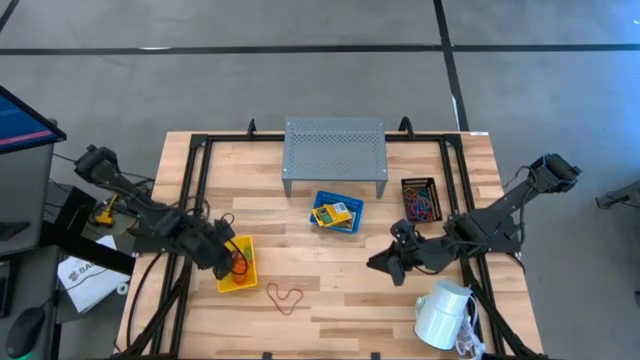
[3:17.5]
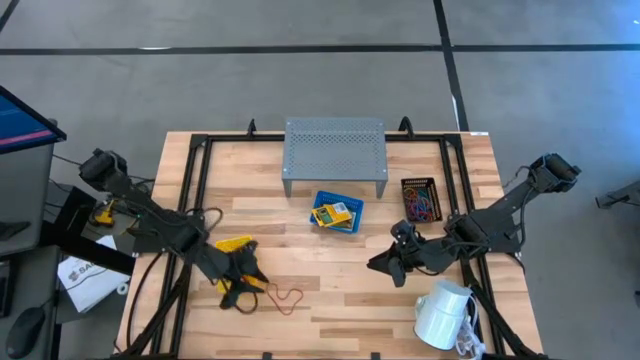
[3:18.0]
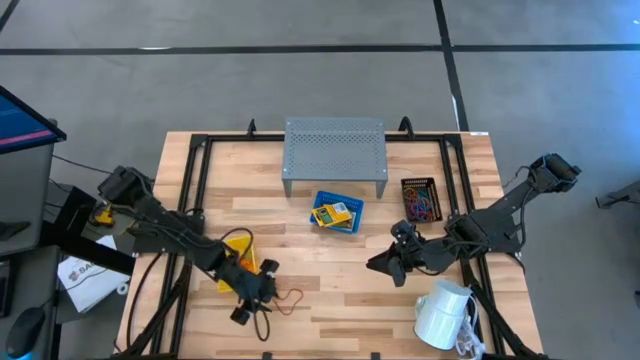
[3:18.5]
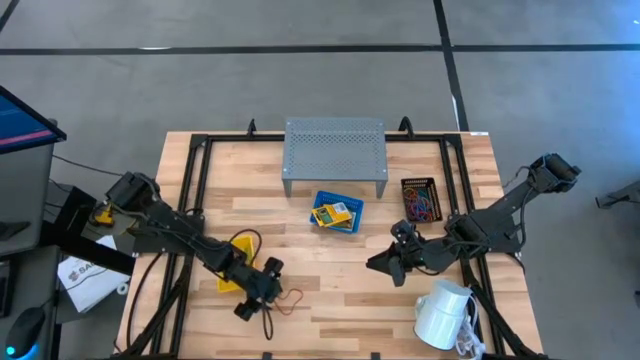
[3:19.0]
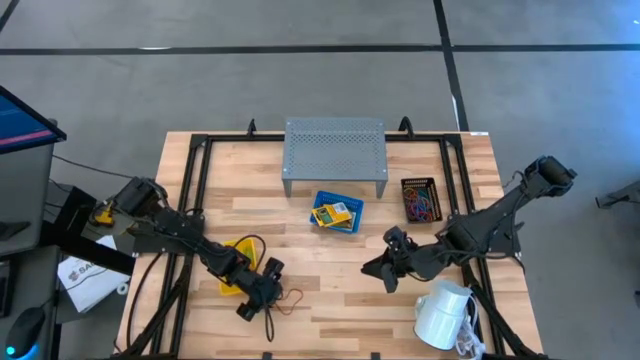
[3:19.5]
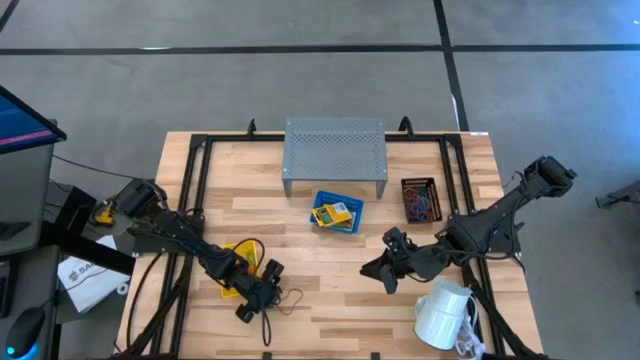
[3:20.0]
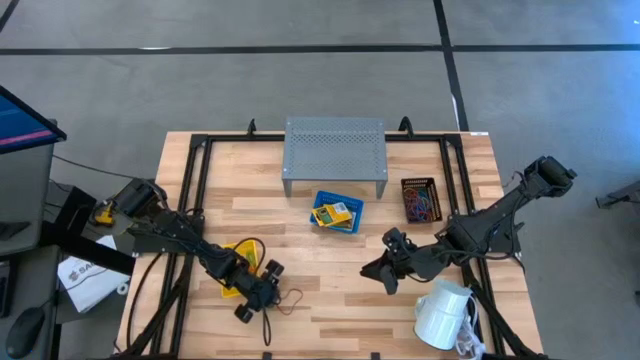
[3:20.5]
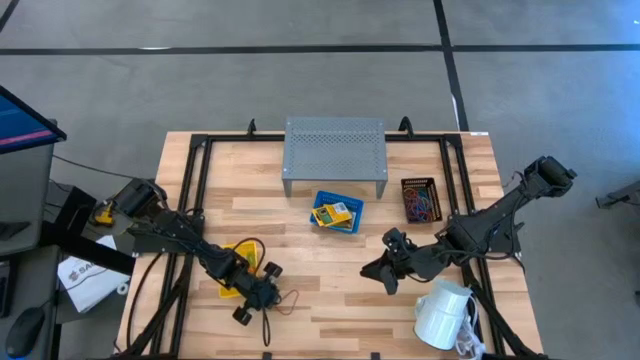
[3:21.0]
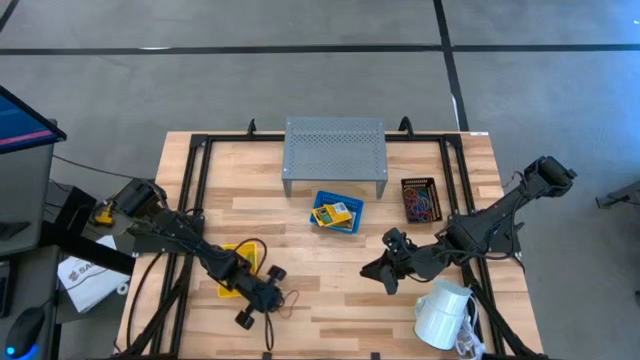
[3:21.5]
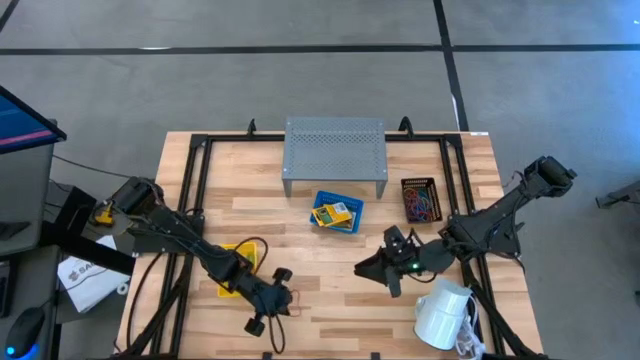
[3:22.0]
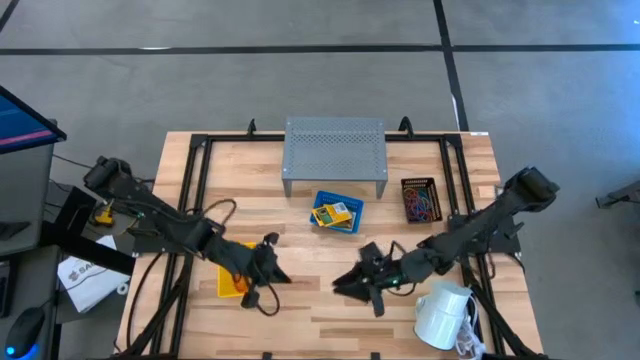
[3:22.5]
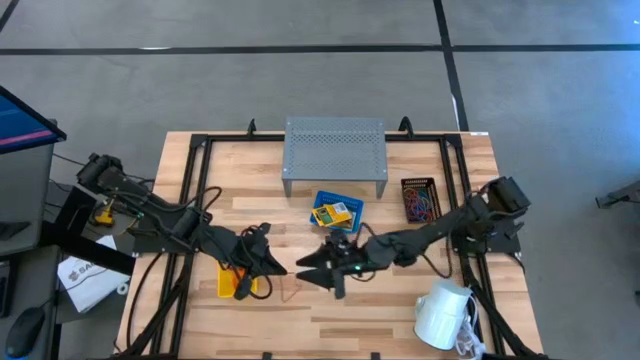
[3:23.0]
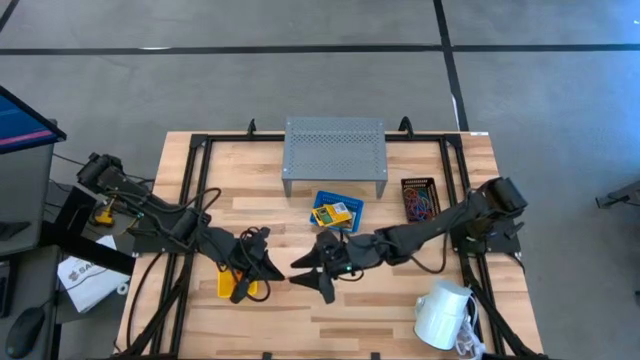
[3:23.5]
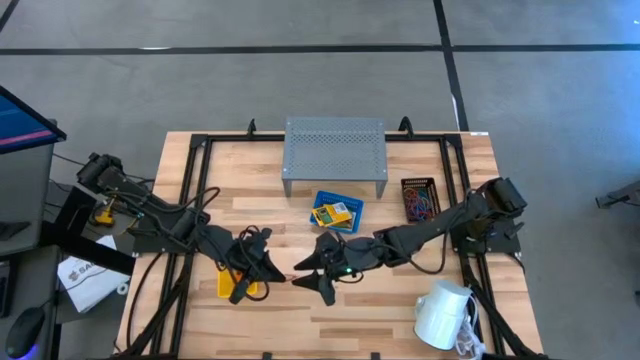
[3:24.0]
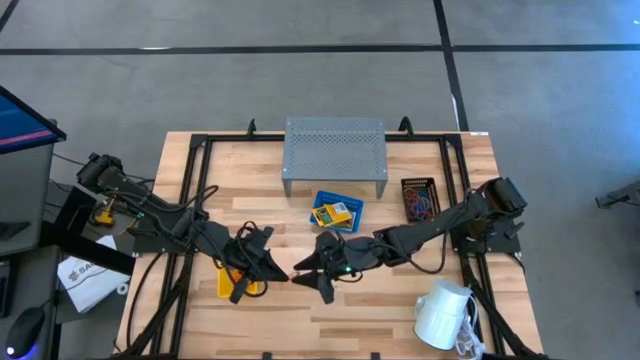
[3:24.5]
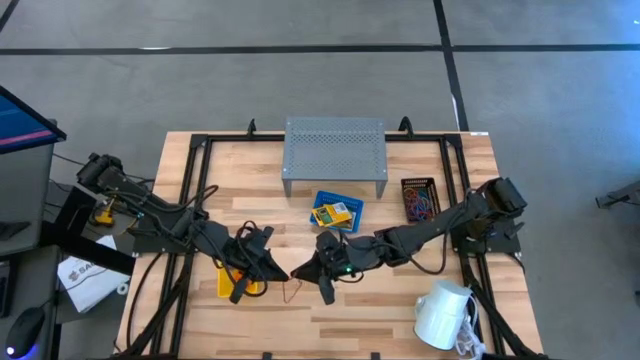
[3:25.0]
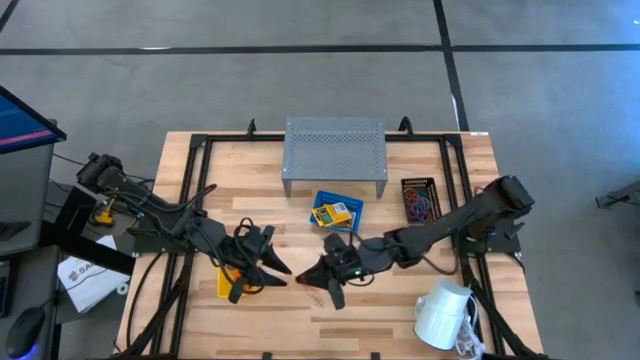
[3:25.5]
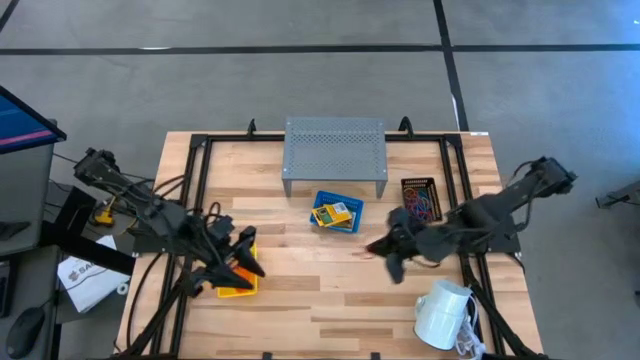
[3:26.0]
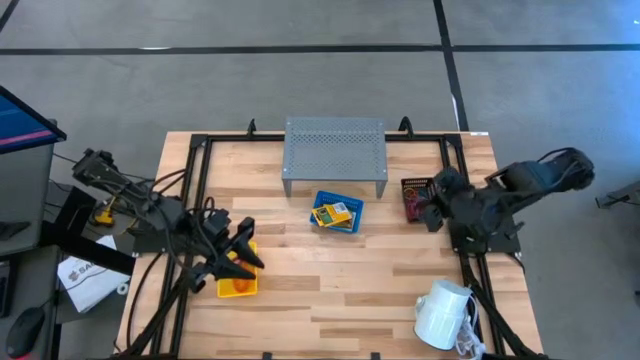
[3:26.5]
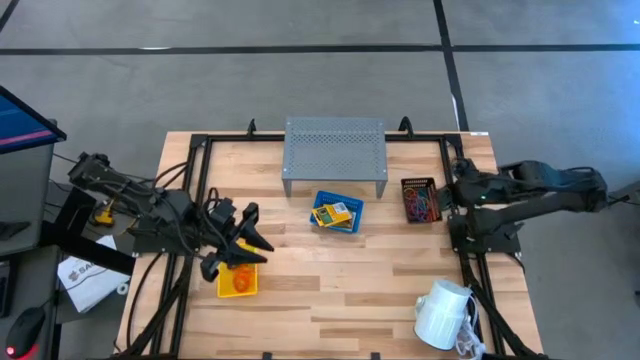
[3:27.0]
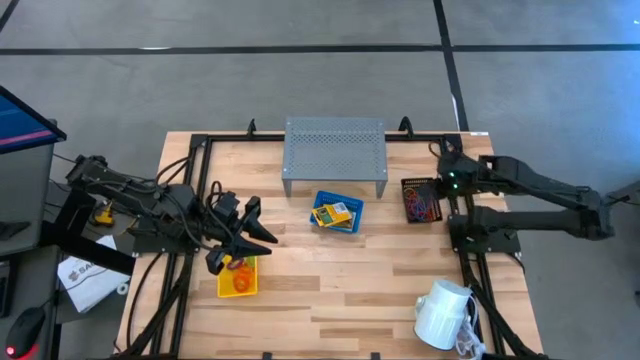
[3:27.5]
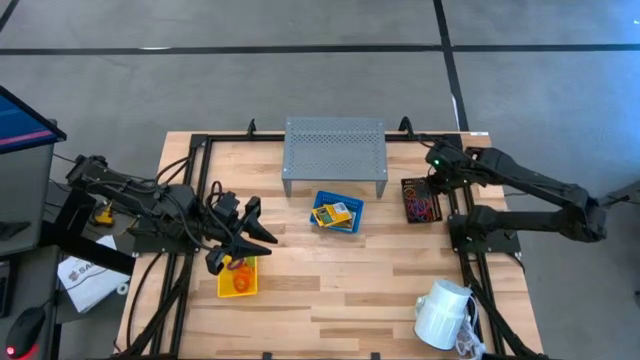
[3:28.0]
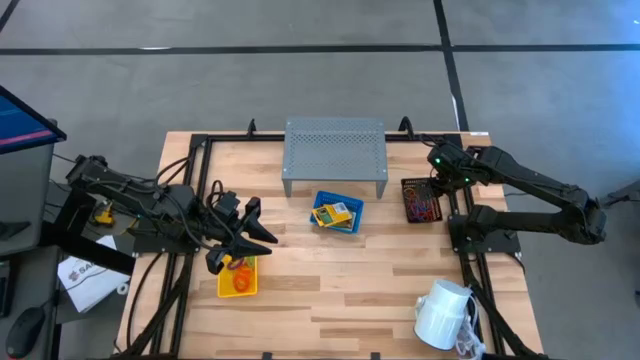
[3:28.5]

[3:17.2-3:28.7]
Task: Pick & Place Office Desk Supplies
Put the red rubber band into the black bin

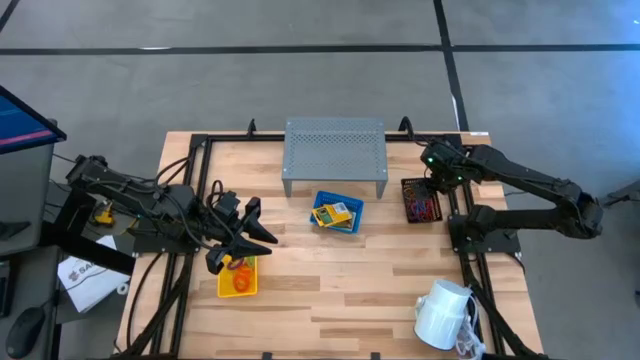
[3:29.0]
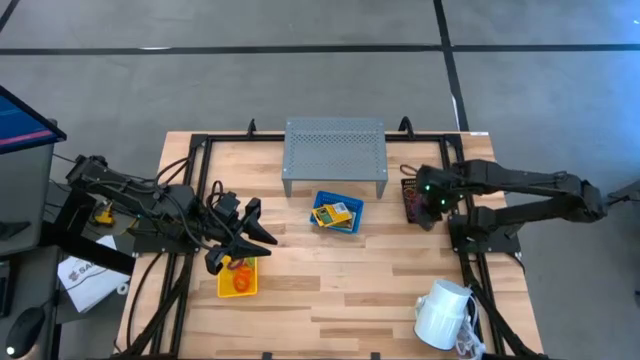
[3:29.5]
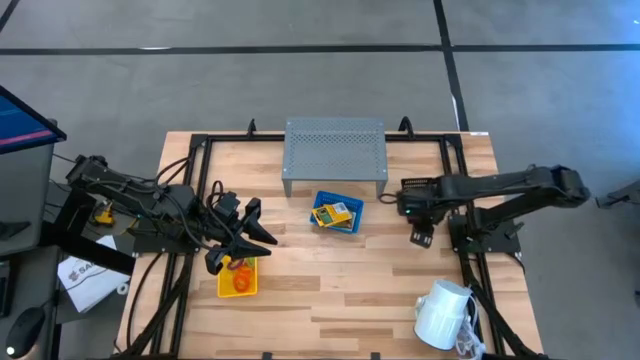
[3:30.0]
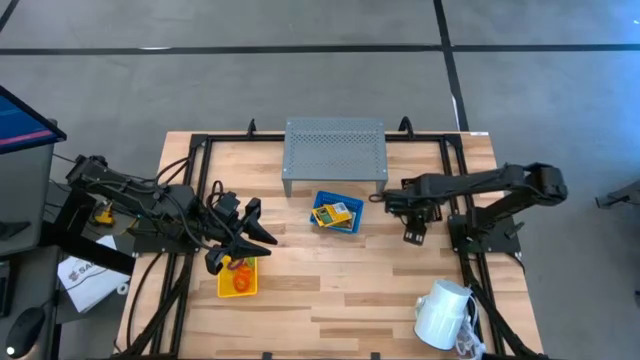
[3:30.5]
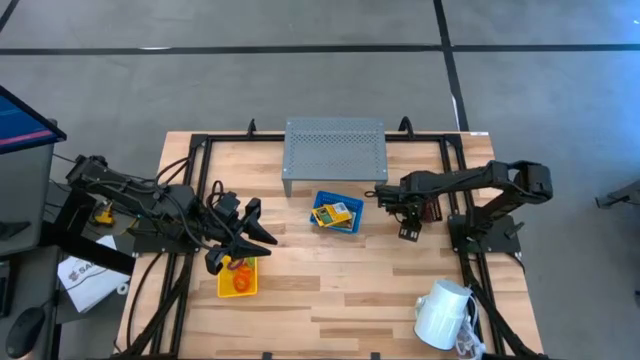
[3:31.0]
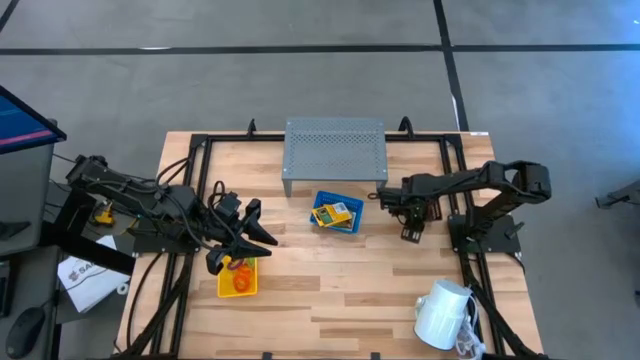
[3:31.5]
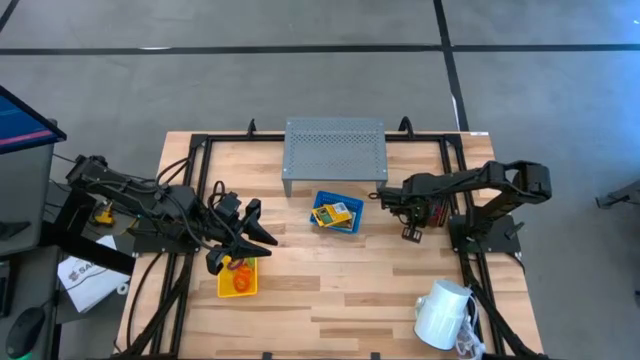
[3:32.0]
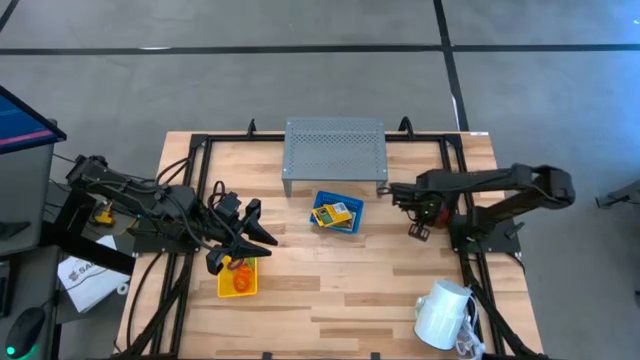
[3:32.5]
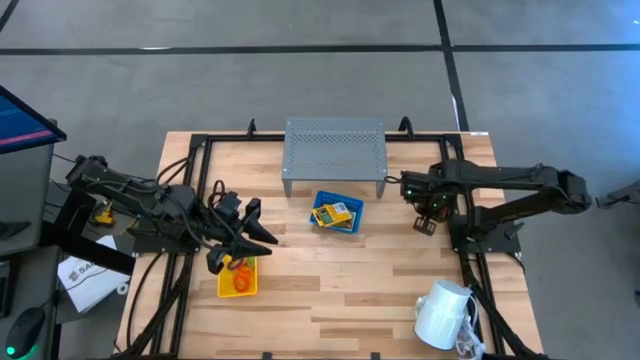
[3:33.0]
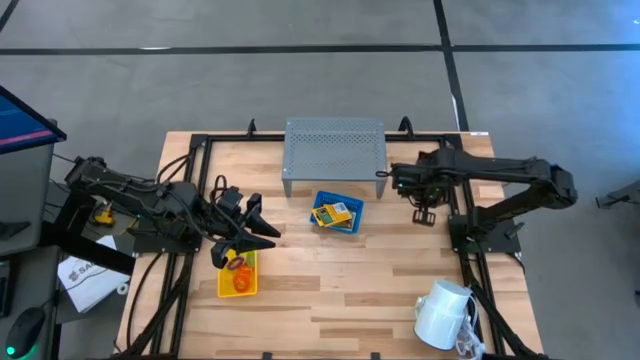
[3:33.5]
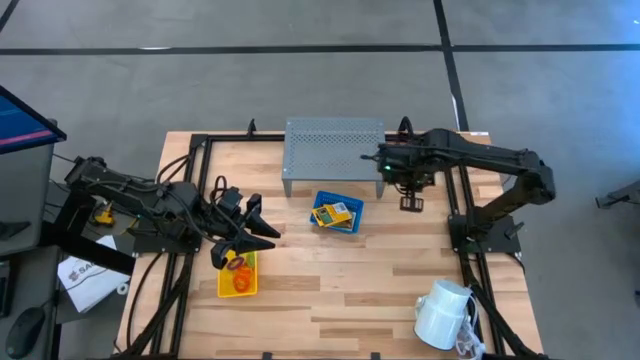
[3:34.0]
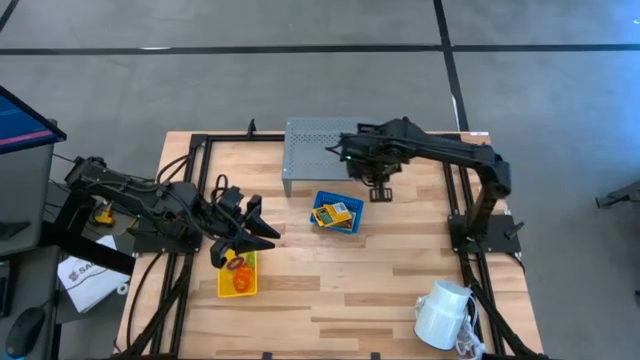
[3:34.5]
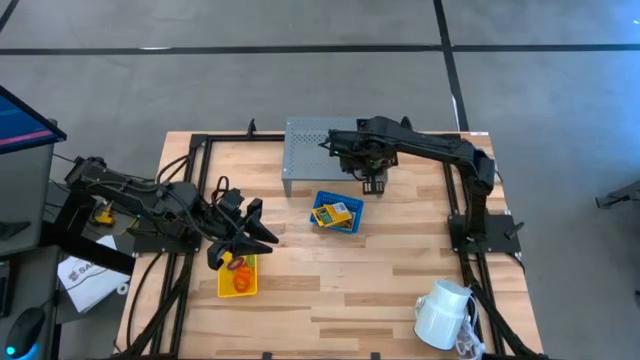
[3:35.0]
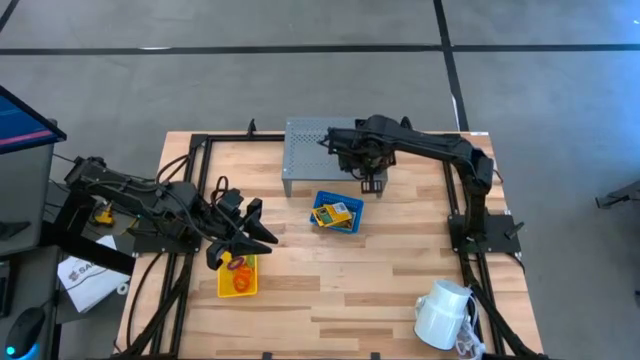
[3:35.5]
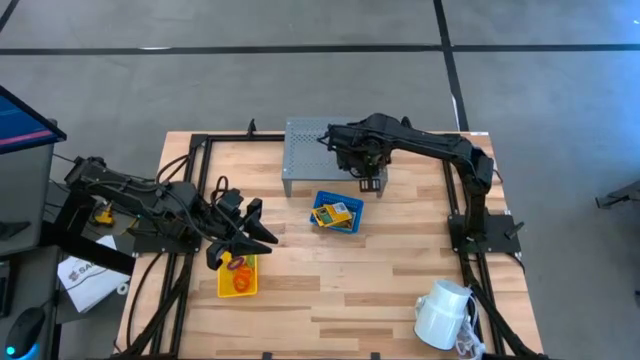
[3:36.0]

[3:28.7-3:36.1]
Put the black bin filled with rubber bands on the shelf

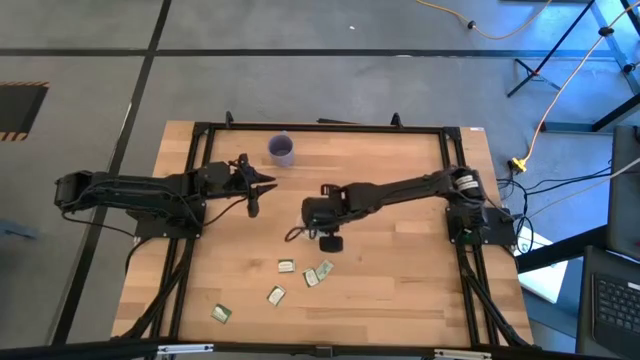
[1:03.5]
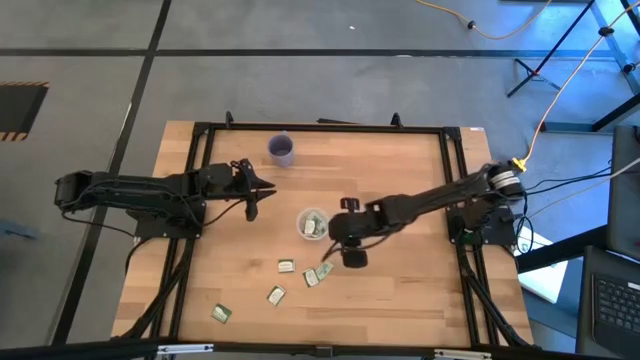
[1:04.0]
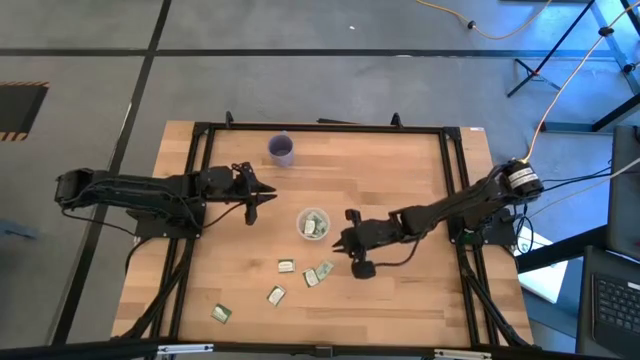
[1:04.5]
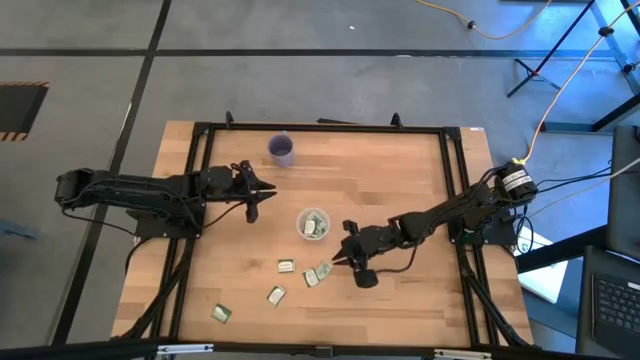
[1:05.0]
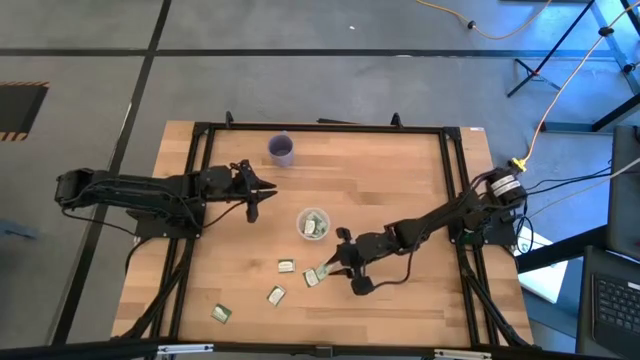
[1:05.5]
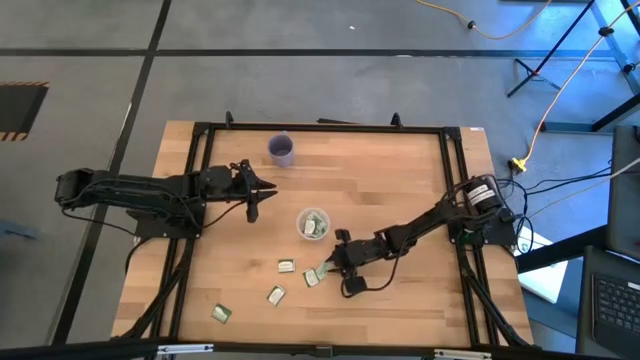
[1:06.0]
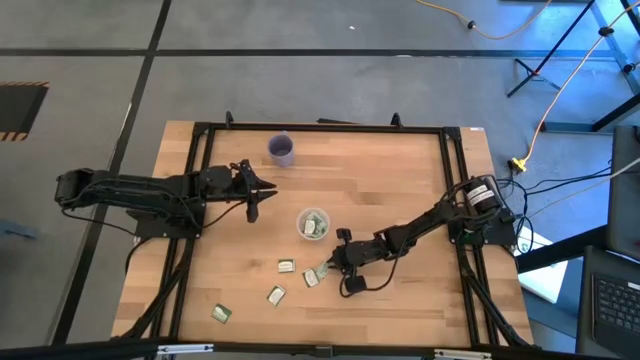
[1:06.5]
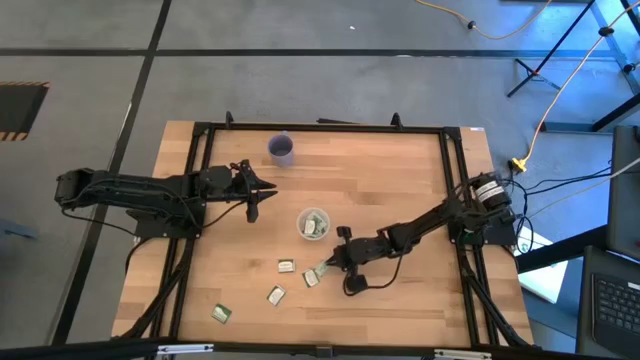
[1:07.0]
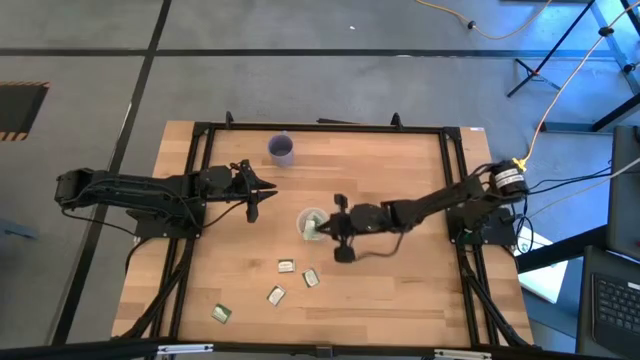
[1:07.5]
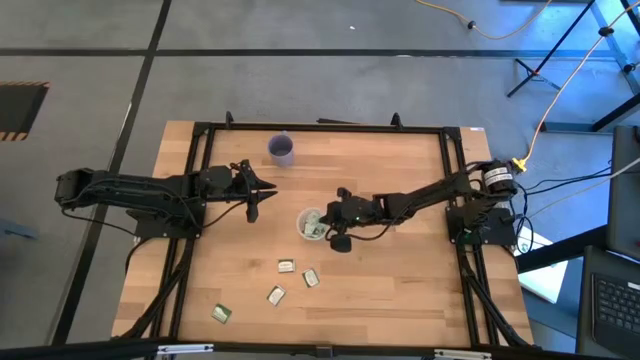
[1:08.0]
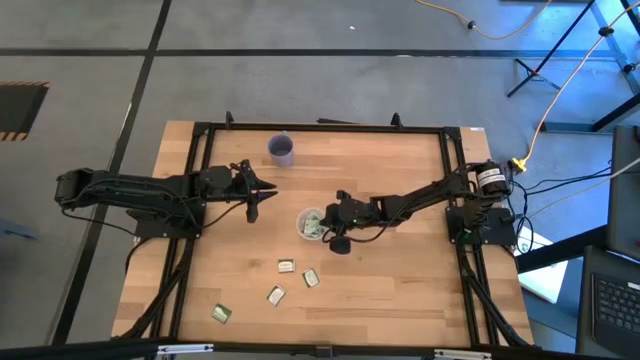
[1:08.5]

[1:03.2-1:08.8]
Task: Pick and place Stevia / Truvia into bins
Put the stevia packet into the transparent container
